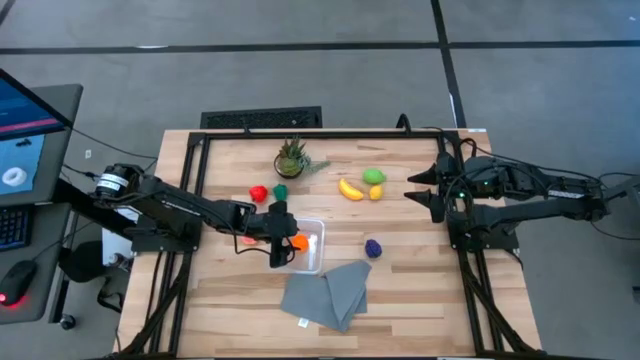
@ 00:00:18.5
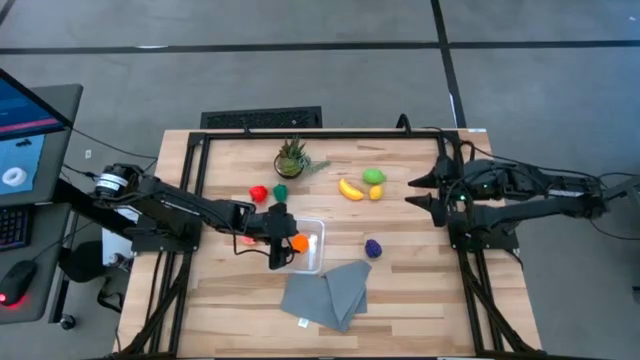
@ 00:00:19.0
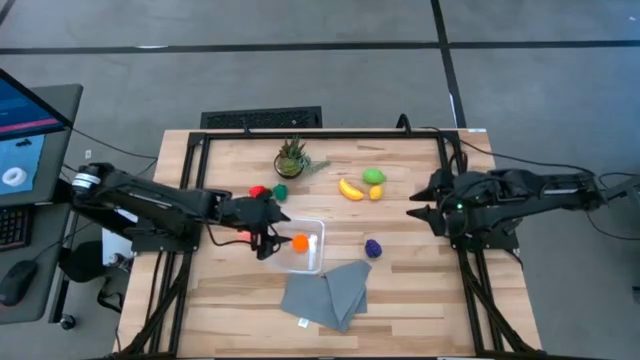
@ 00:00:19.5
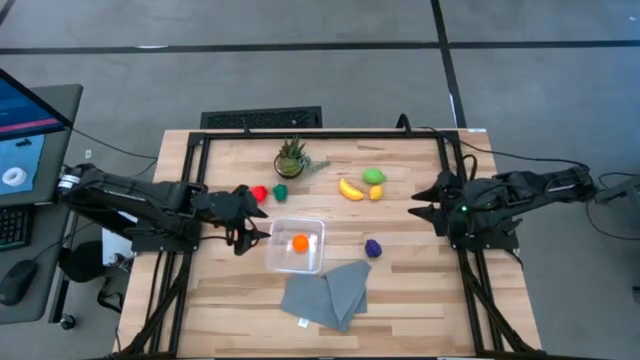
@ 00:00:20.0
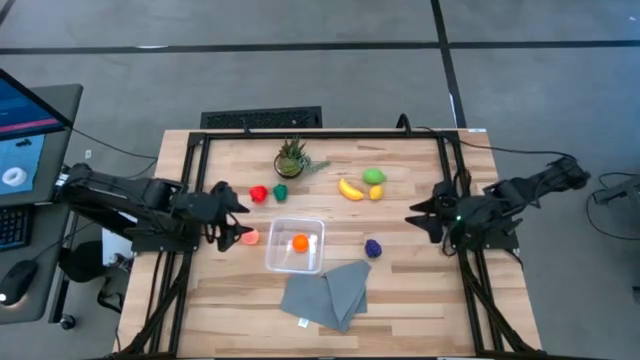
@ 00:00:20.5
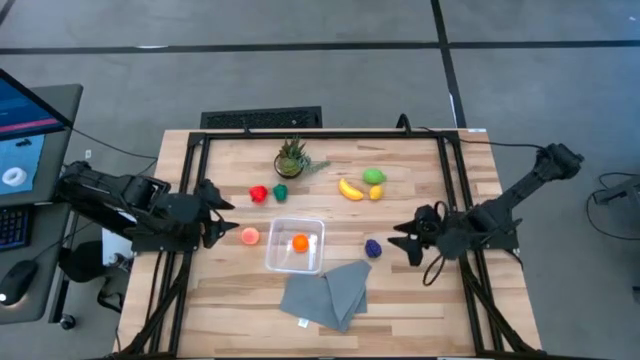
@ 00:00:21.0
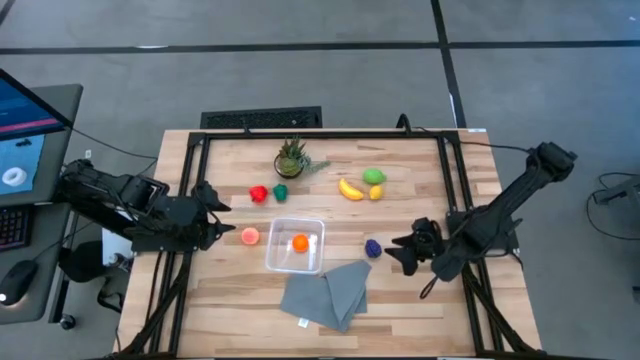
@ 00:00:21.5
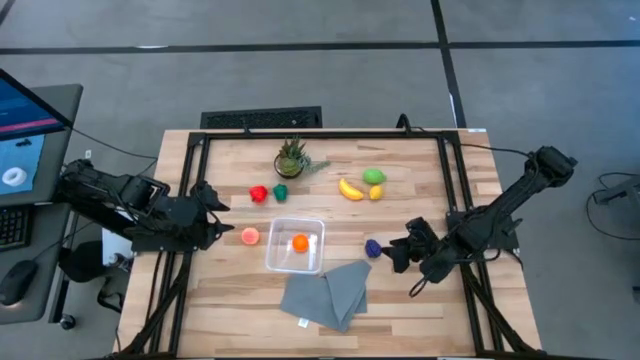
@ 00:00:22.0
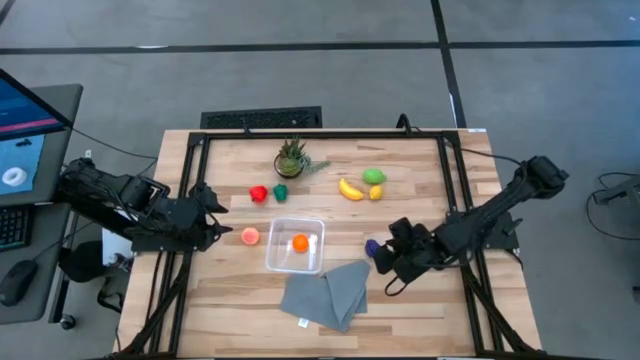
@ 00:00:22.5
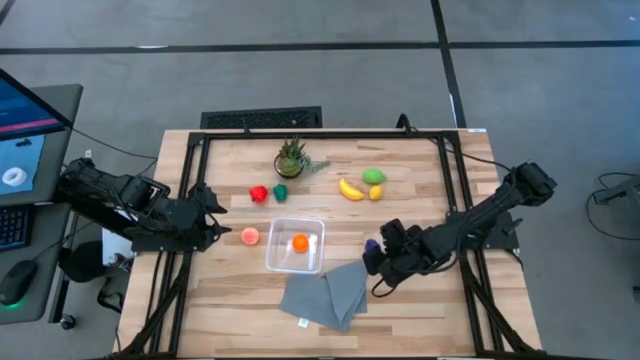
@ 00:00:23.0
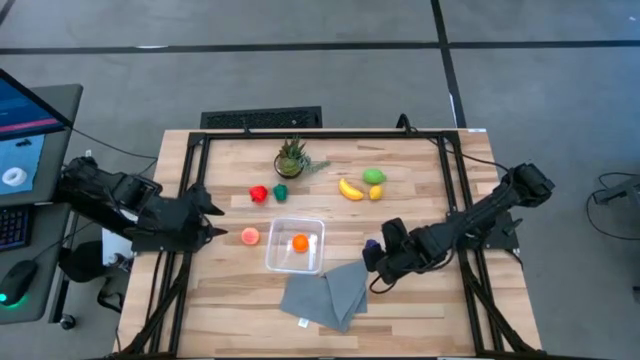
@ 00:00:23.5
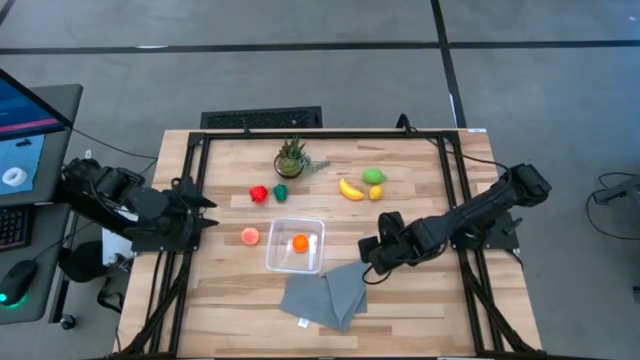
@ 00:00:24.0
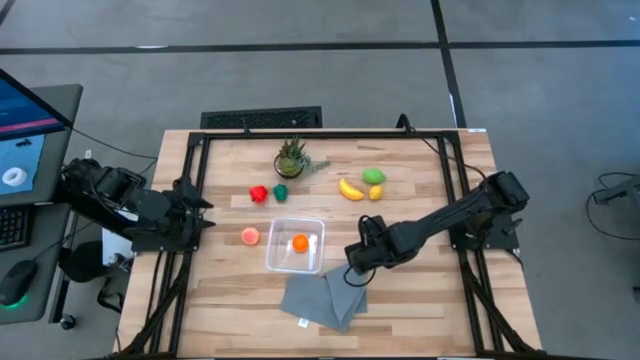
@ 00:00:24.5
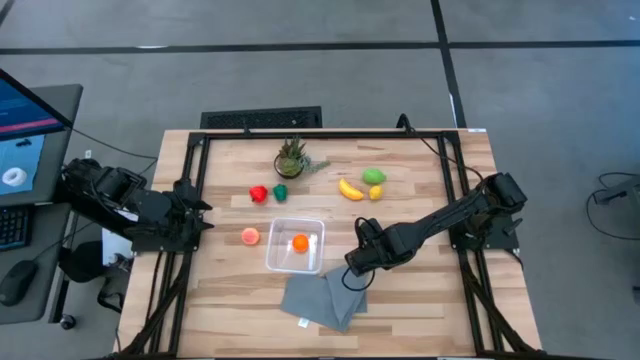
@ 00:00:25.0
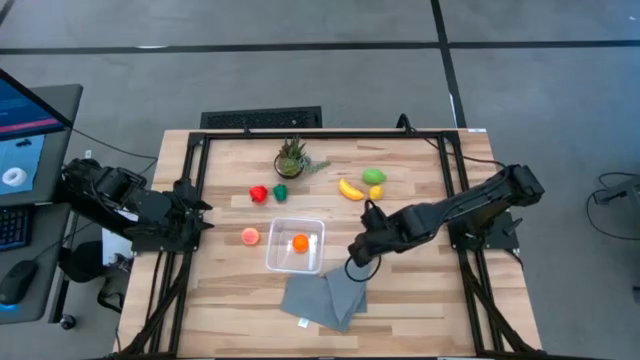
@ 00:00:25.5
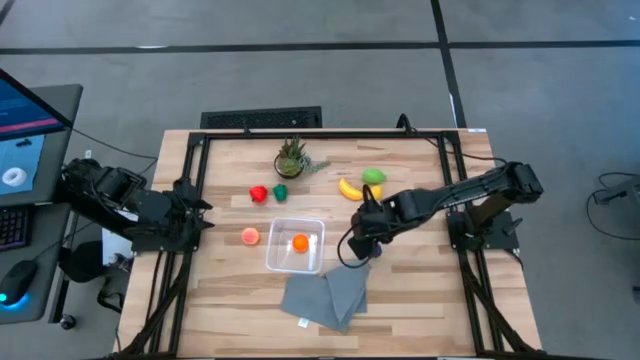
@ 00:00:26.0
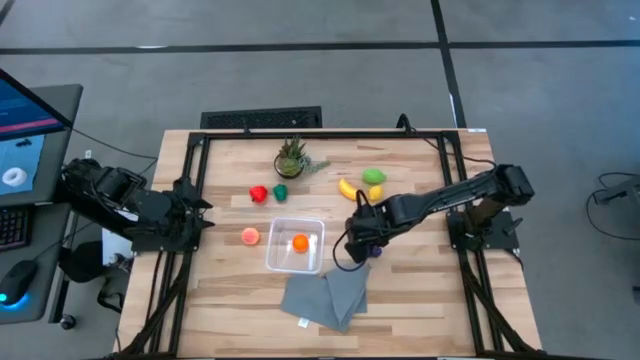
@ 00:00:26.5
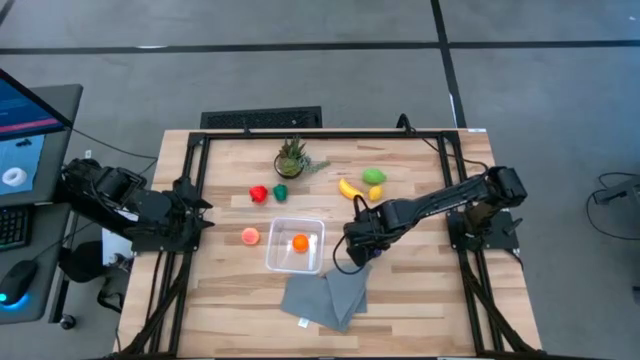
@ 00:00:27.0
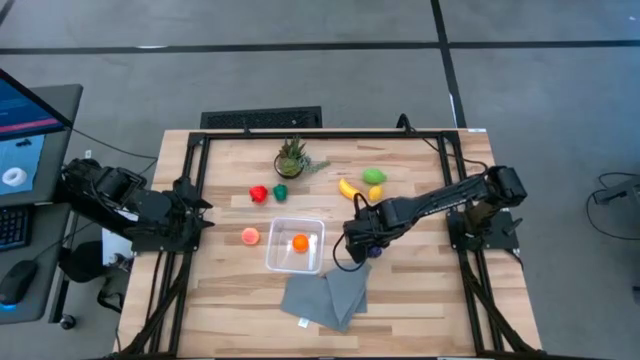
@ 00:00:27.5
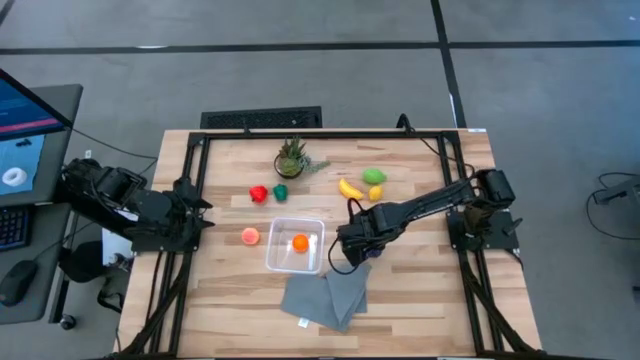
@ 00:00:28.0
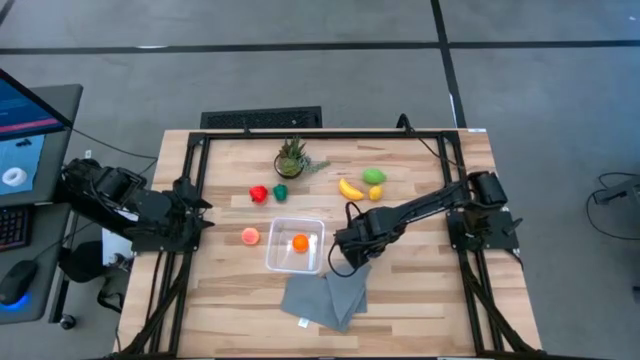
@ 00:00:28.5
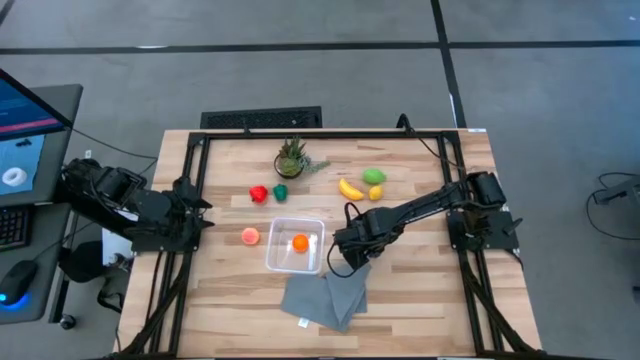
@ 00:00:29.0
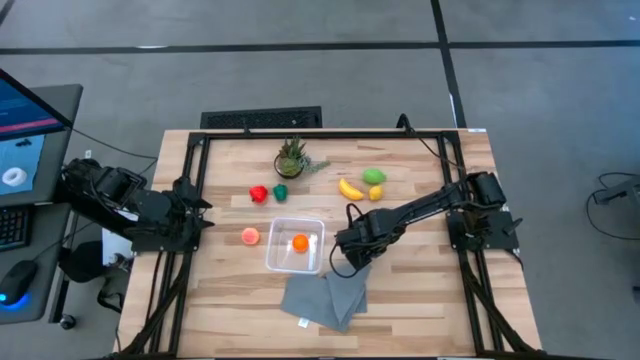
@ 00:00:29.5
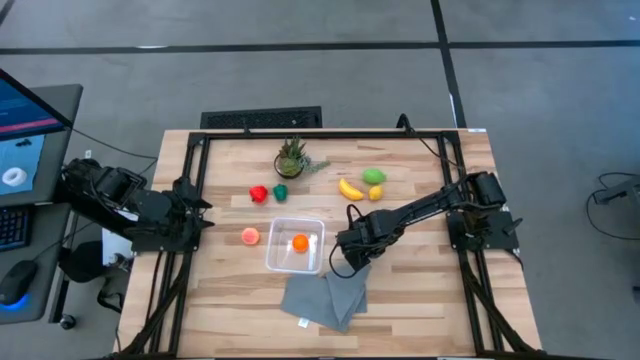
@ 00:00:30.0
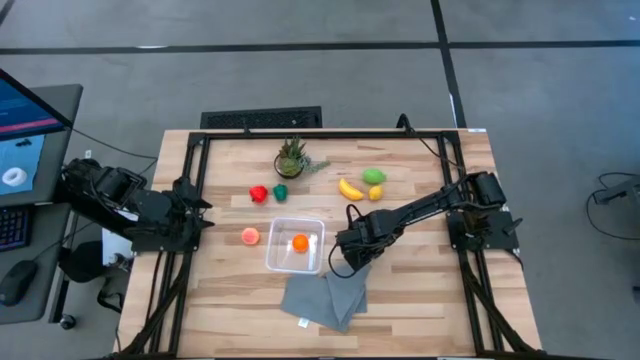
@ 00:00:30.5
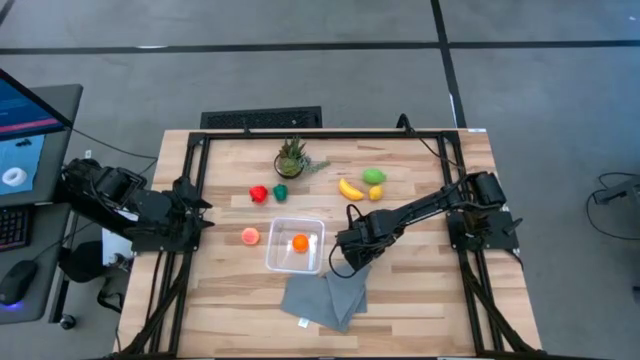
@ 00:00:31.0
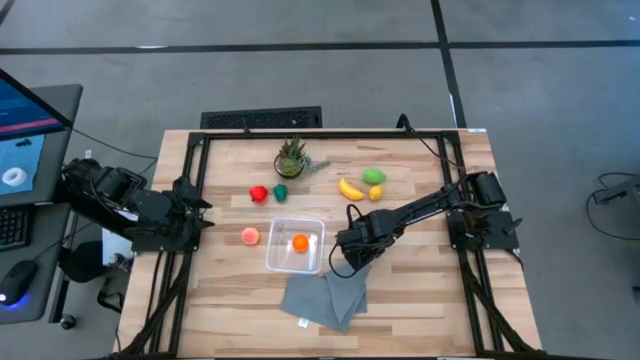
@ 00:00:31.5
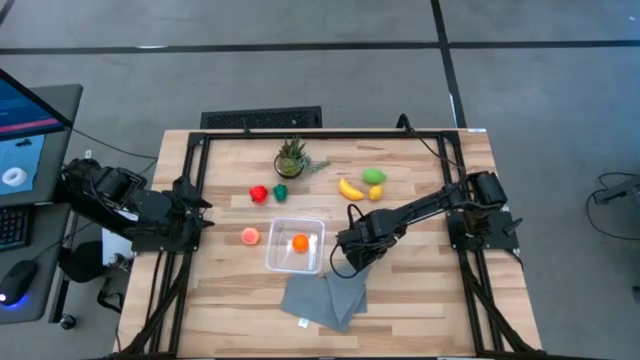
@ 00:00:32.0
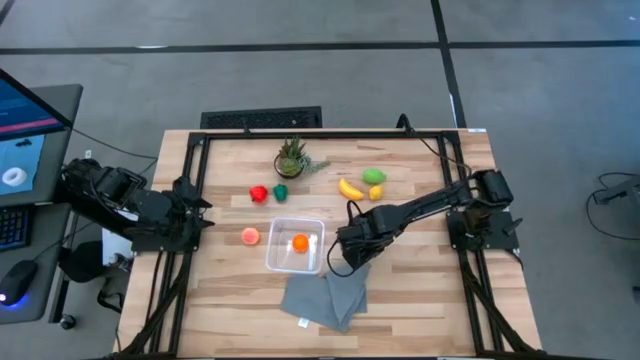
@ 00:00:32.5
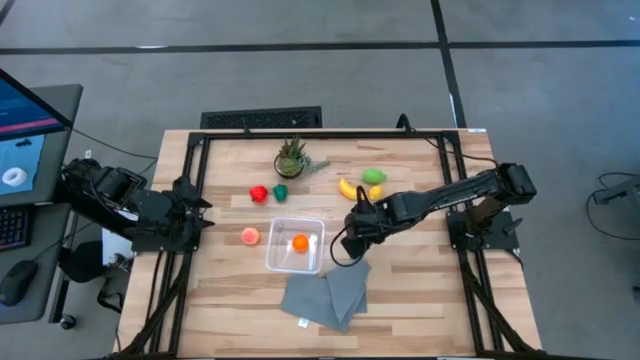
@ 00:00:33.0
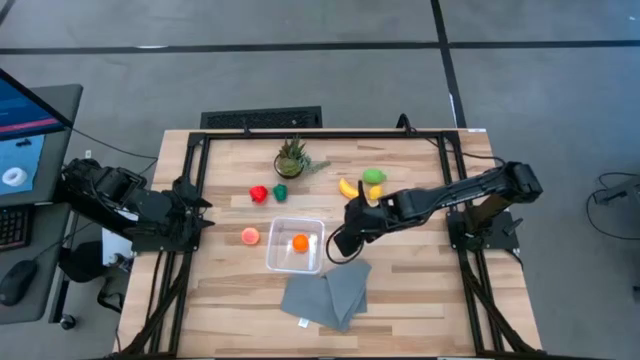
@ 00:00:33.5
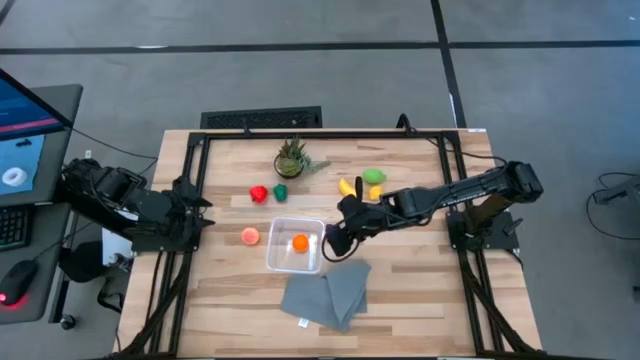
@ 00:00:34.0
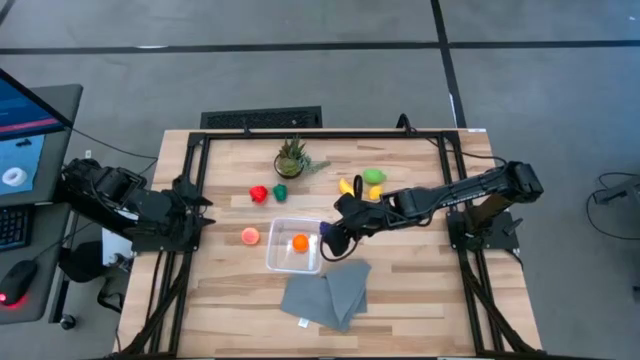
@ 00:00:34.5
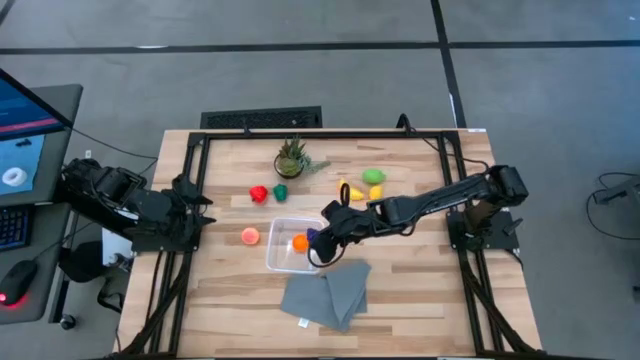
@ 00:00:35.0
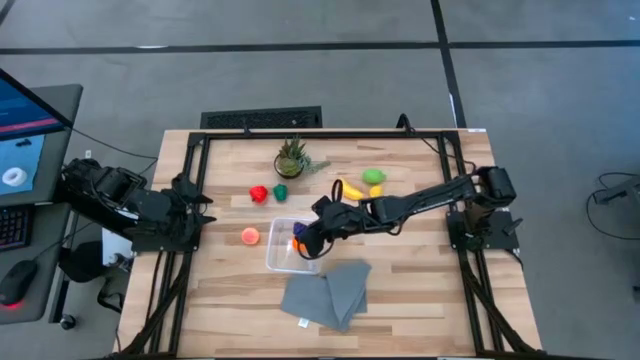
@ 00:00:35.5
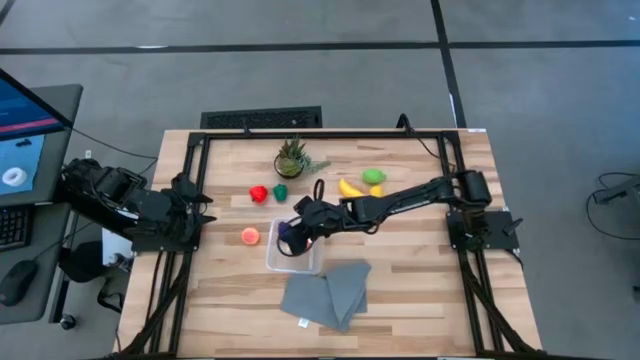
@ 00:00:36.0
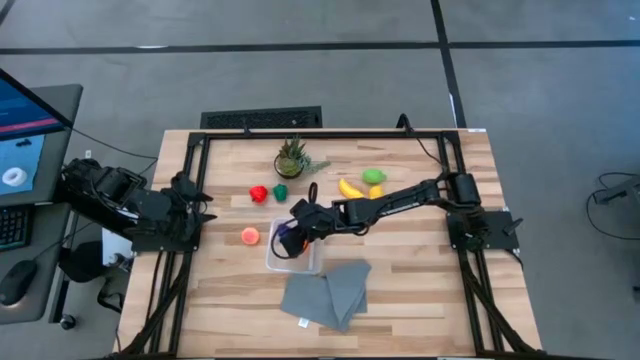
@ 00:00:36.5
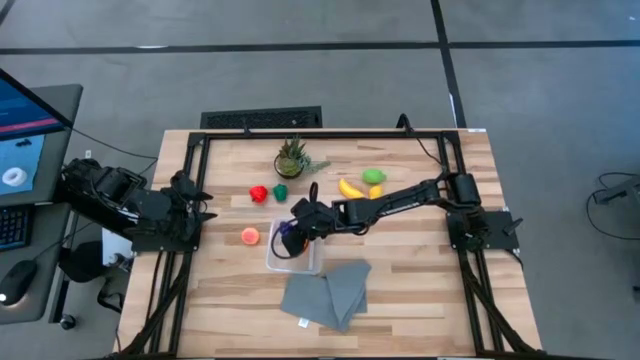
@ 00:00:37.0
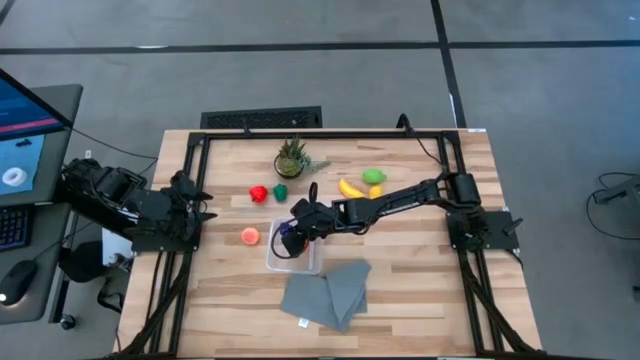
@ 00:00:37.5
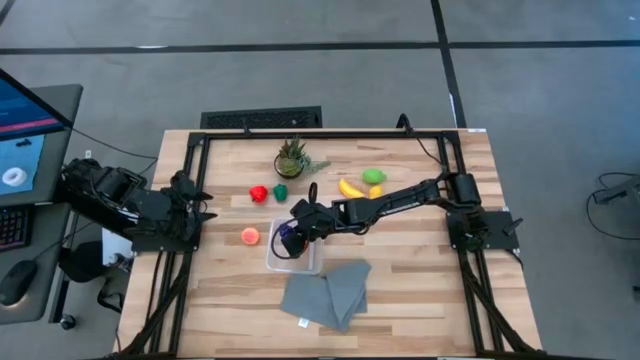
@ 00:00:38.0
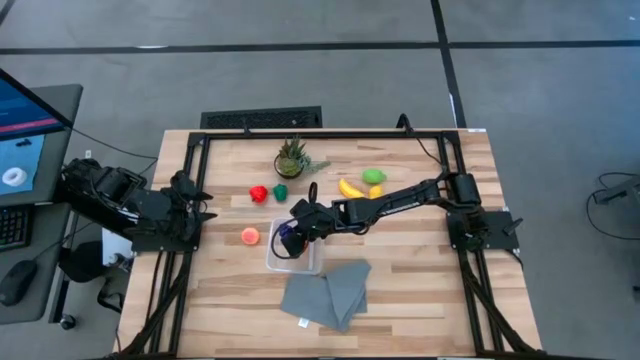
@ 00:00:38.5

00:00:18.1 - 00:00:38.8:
Task: Pick and placing Produce into tupperware
Put the purple grapes into the transparent container
